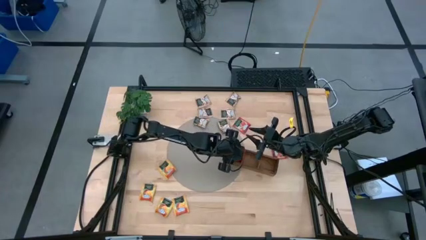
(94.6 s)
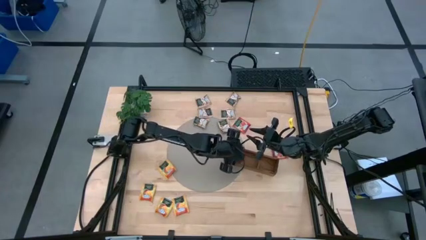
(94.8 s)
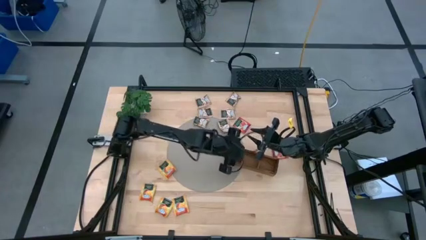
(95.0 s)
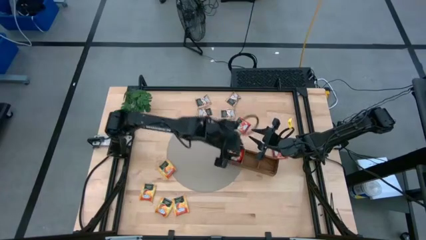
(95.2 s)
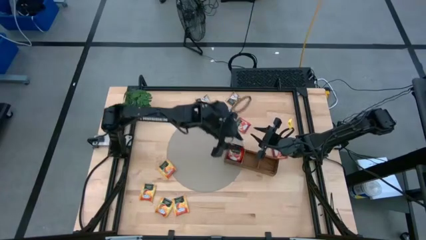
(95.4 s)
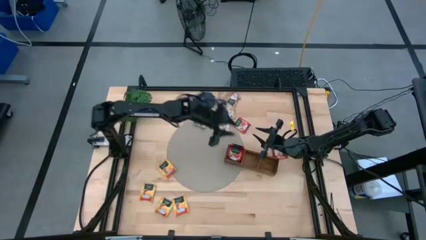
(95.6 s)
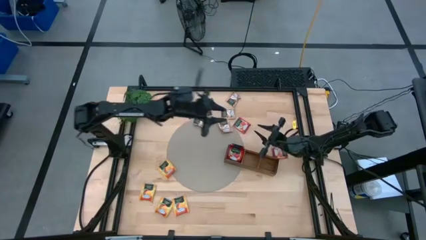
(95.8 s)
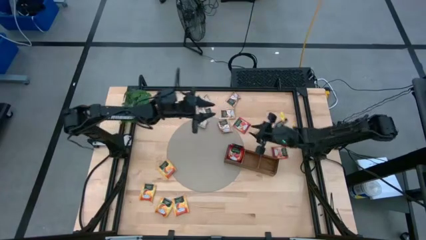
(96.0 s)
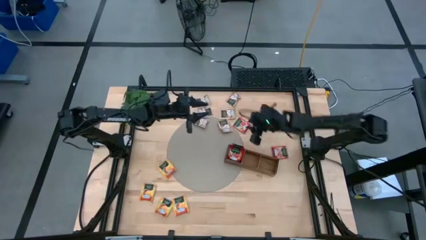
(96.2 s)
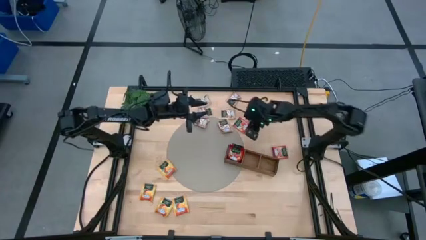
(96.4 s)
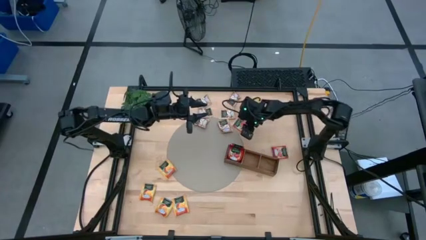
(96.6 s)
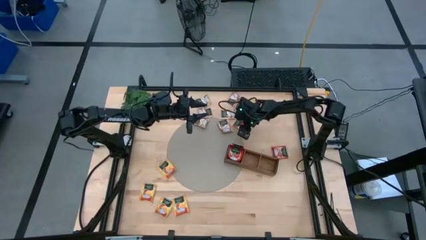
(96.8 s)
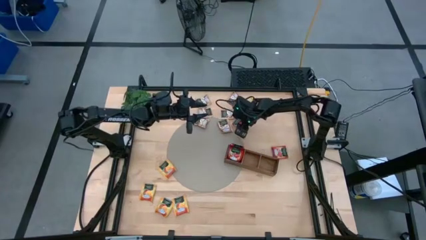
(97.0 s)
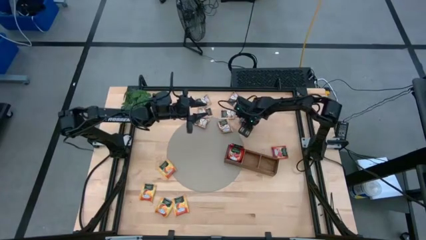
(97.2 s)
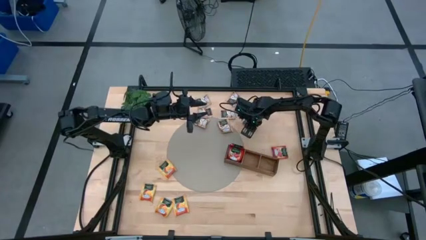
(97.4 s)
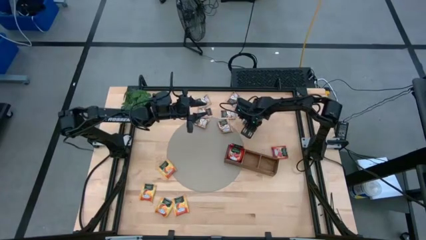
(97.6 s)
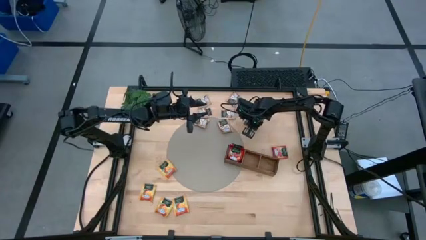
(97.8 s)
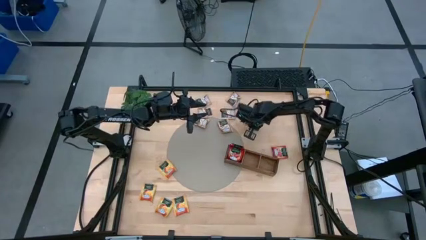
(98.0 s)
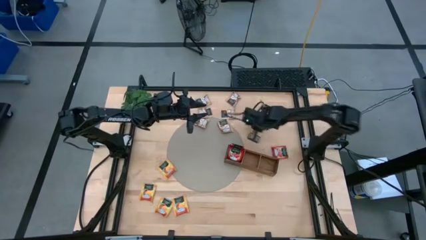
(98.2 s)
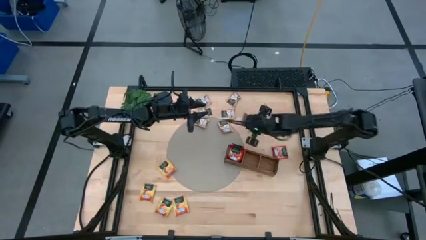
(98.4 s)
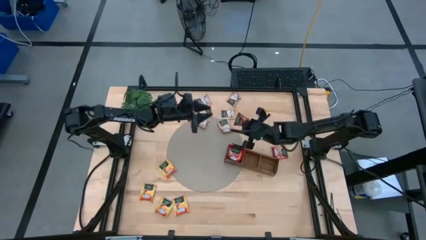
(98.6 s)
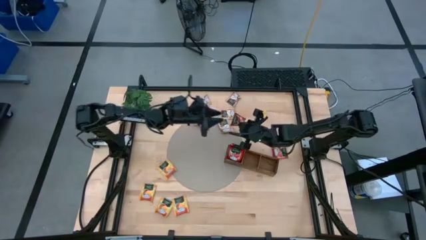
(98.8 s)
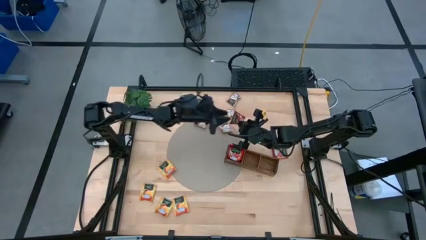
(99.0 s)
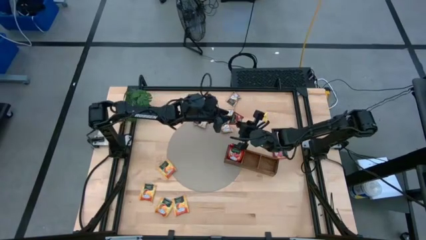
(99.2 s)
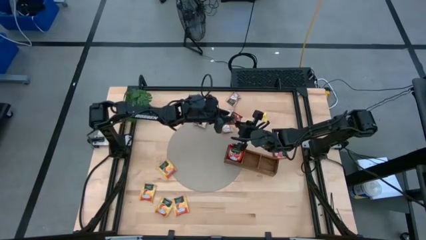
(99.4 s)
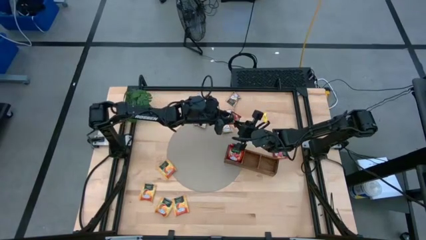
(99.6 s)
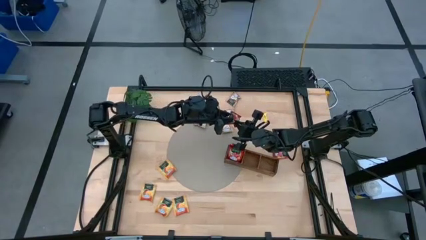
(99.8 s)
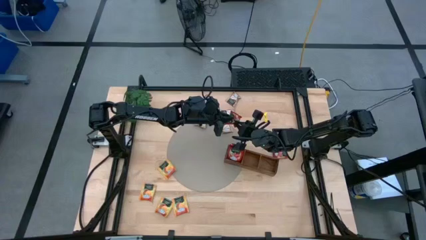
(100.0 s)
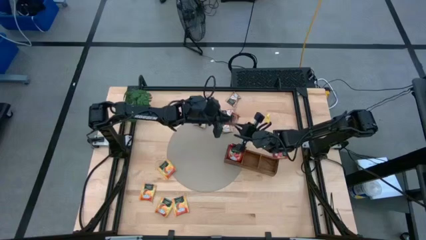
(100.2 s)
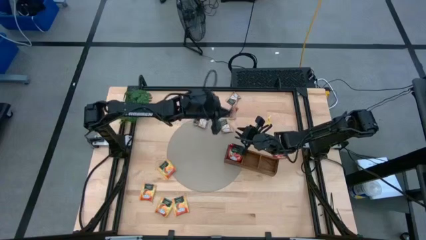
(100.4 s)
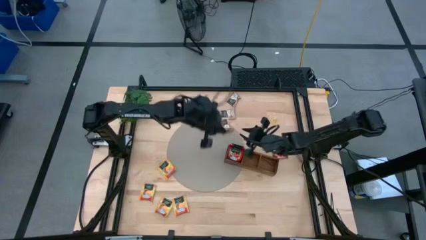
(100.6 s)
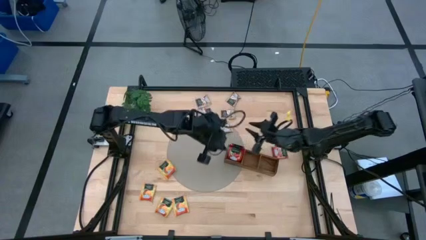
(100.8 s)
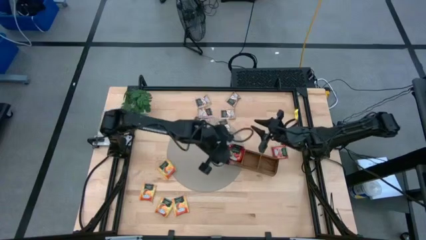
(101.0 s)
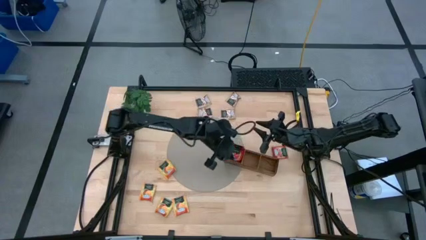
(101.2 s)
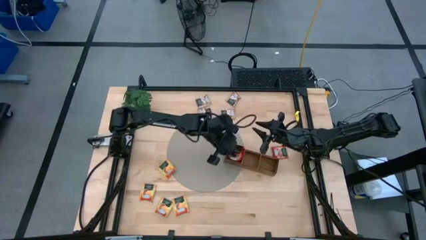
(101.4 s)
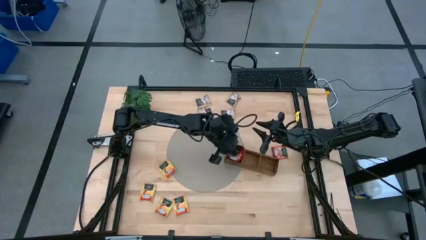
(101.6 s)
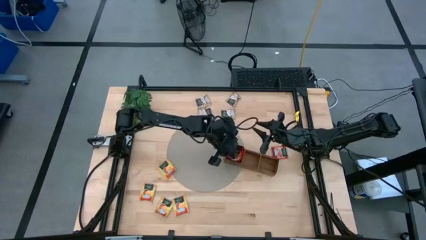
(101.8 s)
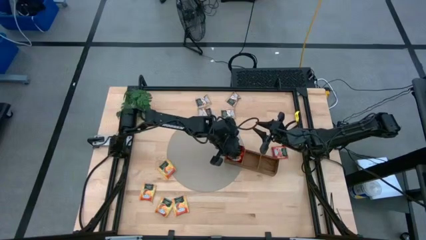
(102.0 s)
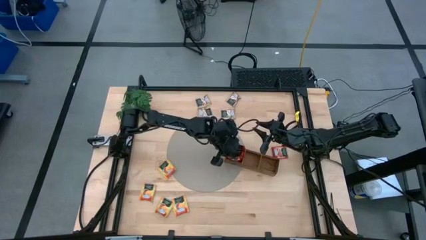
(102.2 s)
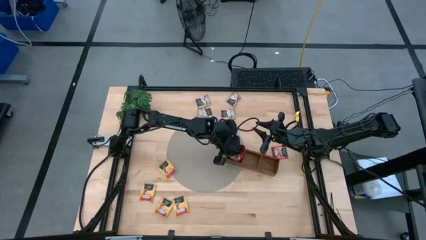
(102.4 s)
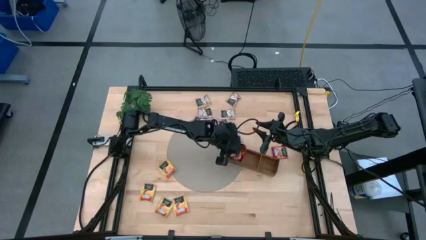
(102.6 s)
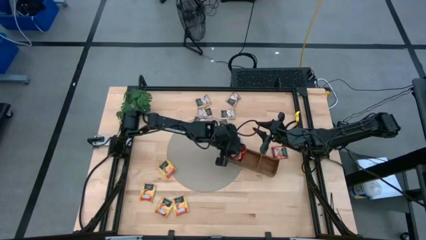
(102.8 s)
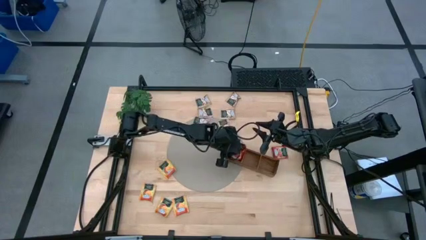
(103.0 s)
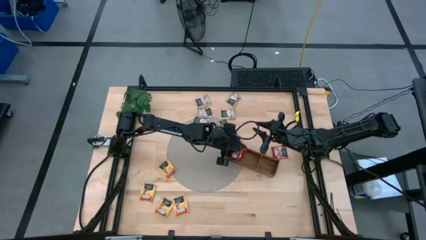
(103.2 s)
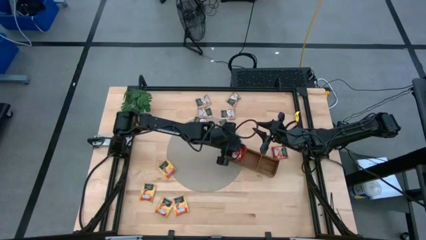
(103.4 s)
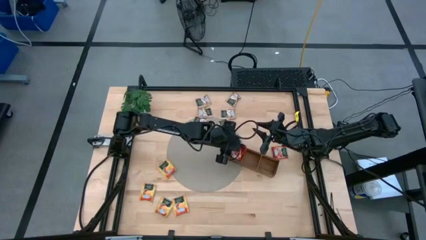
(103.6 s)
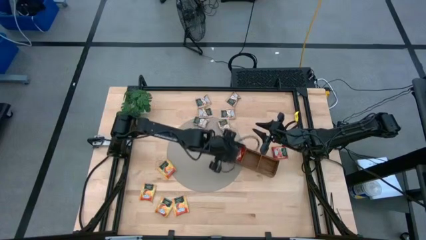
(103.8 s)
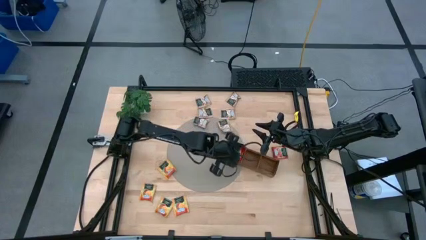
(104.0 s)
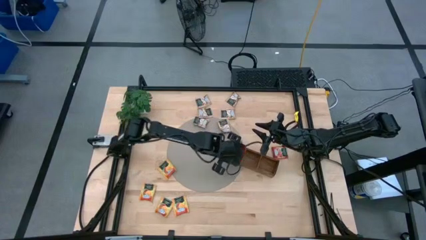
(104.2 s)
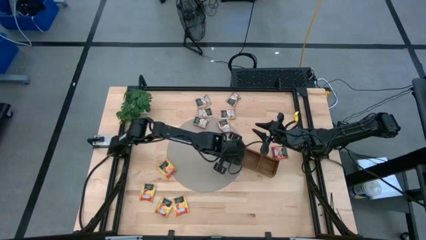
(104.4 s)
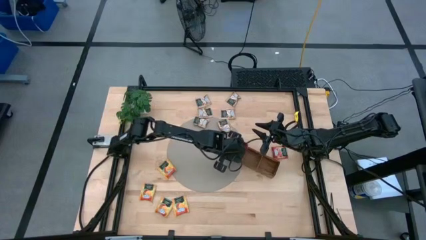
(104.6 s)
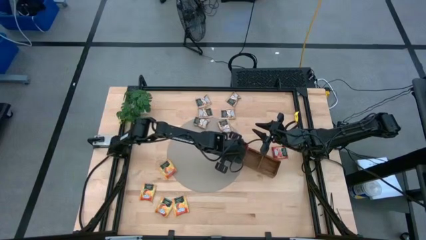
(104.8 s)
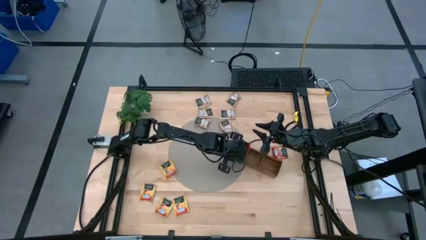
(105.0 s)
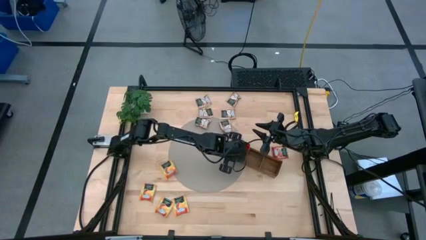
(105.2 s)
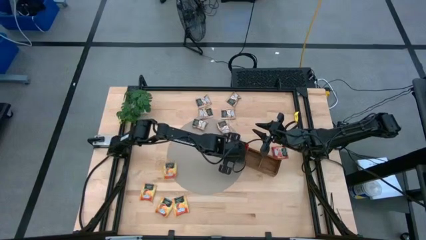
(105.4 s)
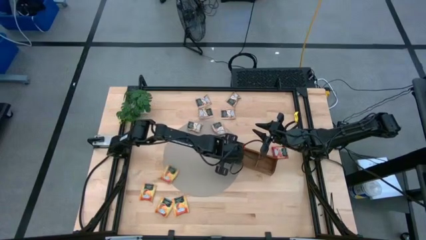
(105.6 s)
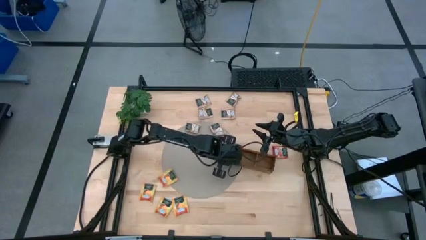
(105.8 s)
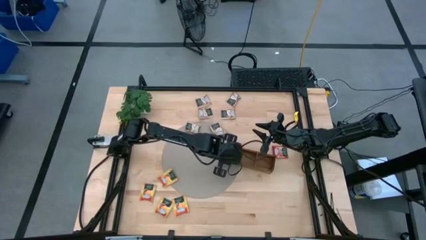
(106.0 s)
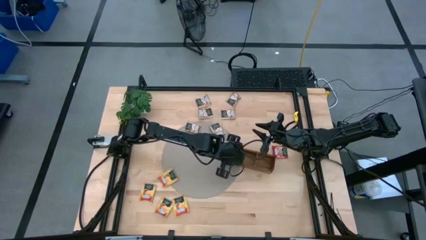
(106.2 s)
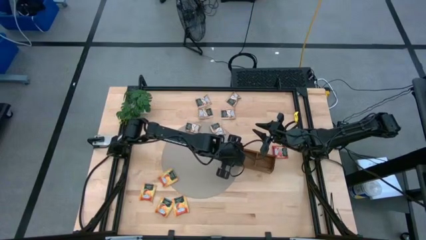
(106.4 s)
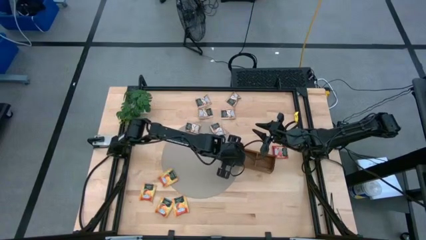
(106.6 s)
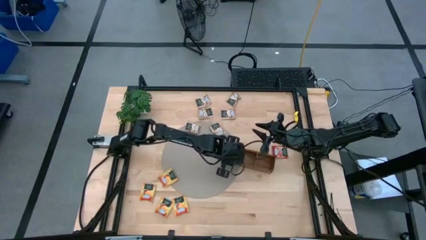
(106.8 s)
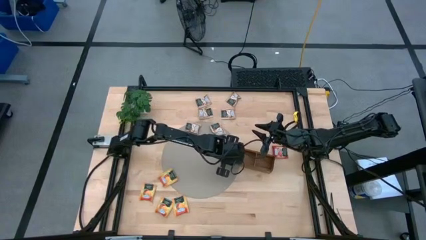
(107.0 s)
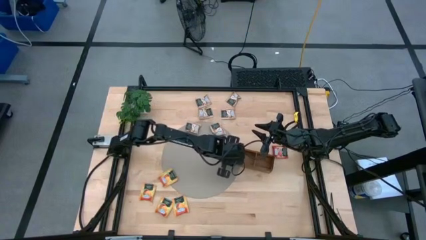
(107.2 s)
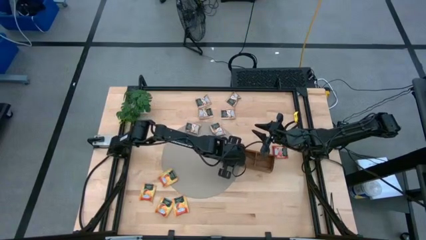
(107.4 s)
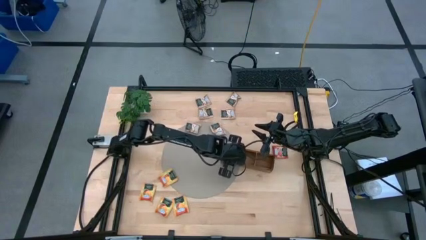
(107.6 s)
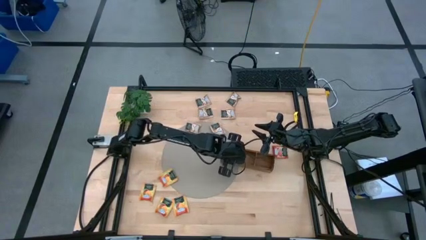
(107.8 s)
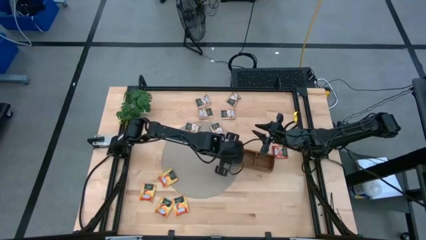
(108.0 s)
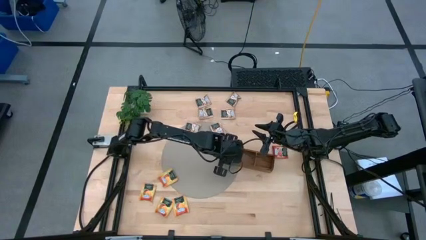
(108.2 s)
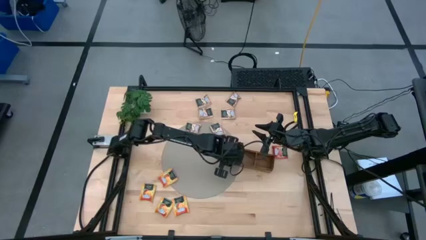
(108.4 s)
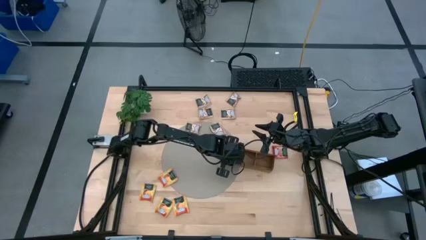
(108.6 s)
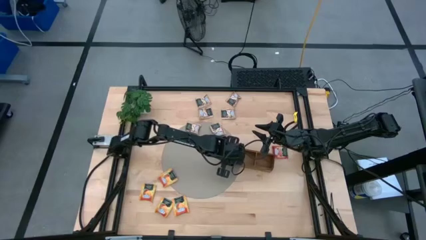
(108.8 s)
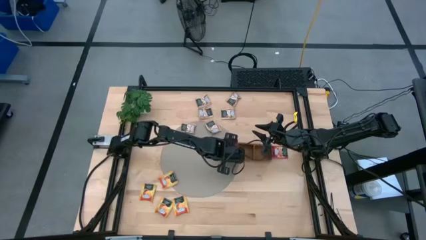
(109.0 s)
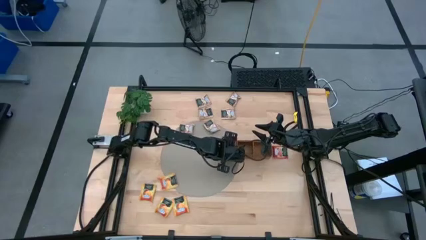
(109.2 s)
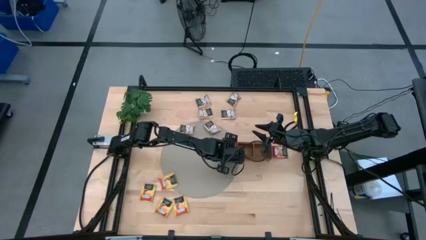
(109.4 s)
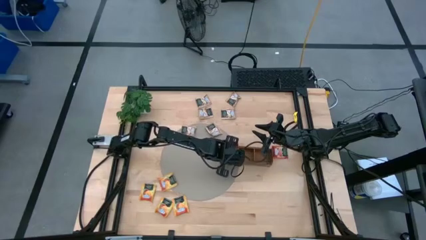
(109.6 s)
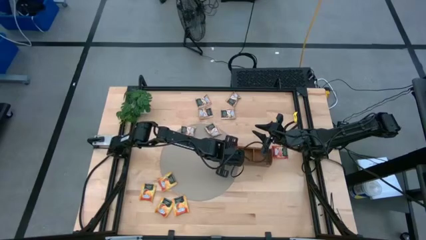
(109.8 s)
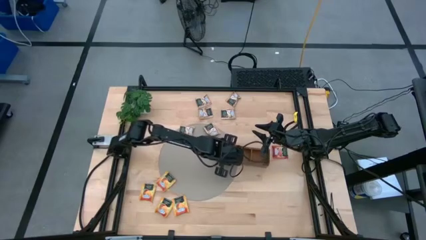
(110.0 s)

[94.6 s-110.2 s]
Task: Pick & Place Tea
Put the red tea bag into the left section of the wooden organizer

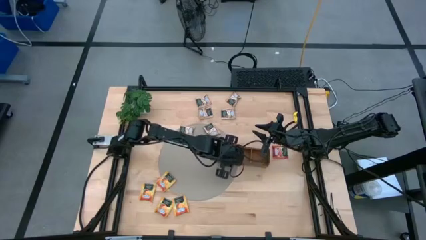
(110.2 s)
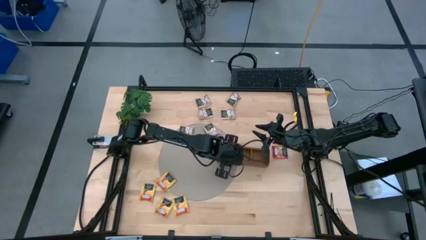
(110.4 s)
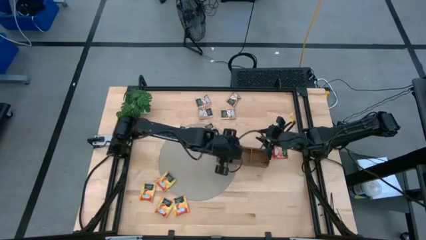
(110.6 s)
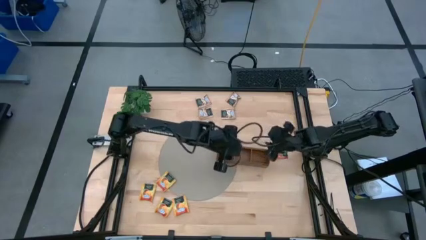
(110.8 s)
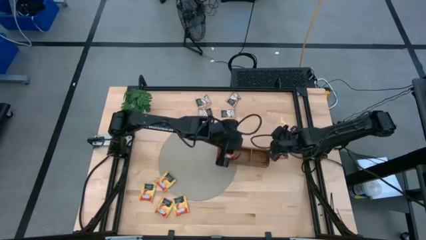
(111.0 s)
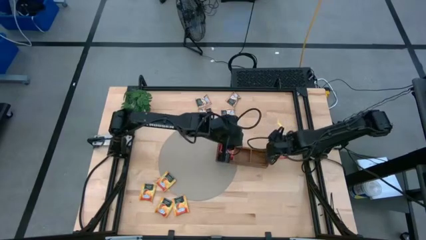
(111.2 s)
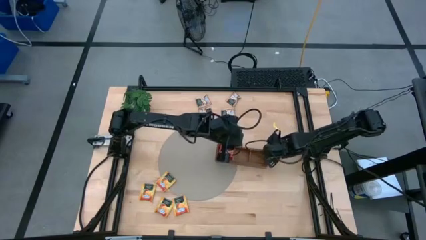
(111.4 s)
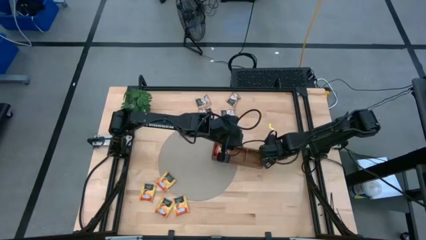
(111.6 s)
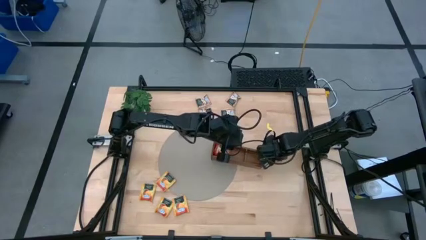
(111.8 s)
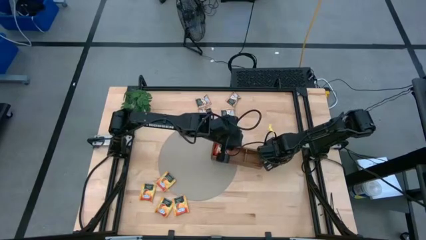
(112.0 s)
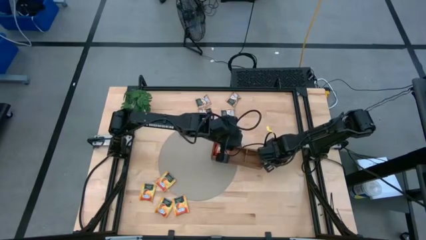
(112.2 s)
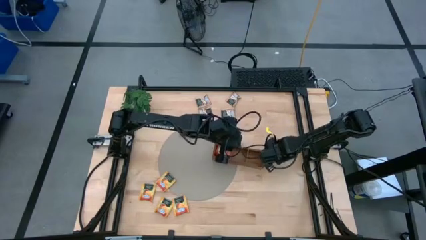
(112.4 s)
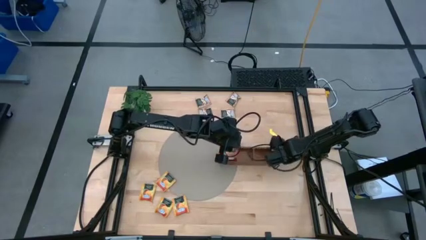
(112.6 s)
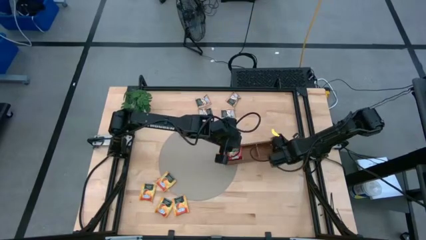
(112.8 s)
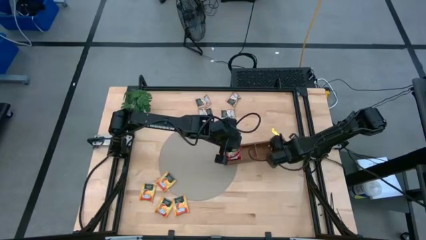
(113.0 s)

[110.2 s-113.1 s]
Put the red tea bag into the left section of the wooden organizer
